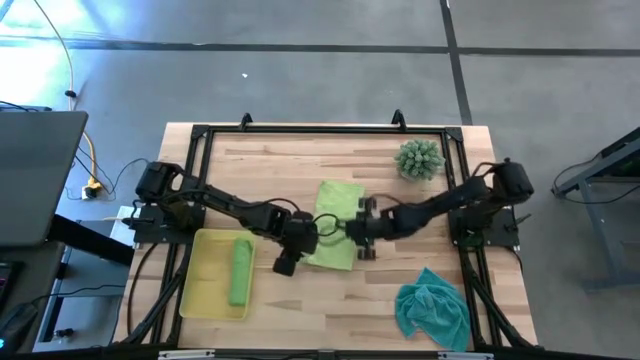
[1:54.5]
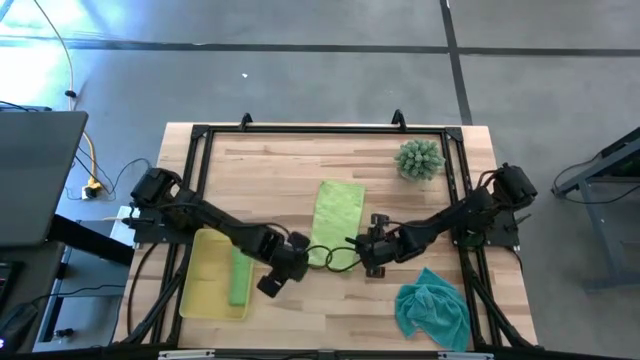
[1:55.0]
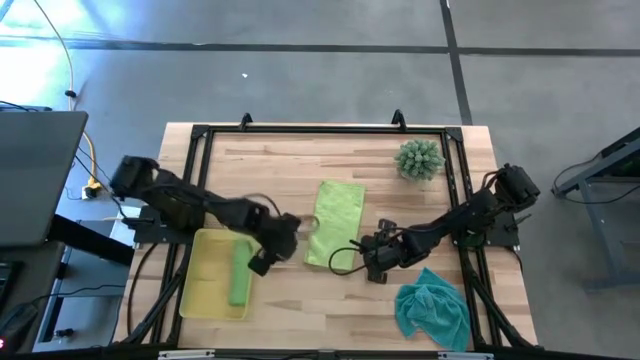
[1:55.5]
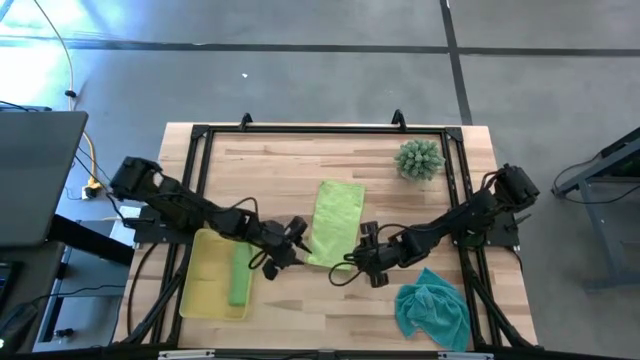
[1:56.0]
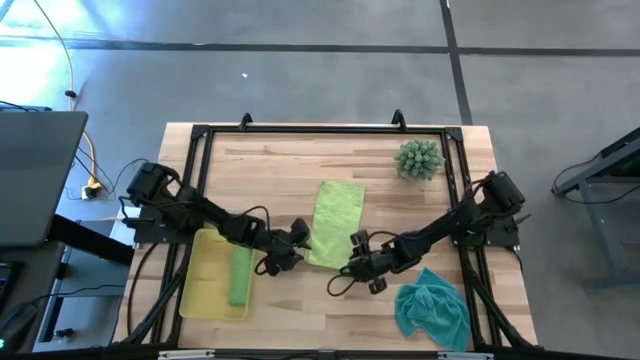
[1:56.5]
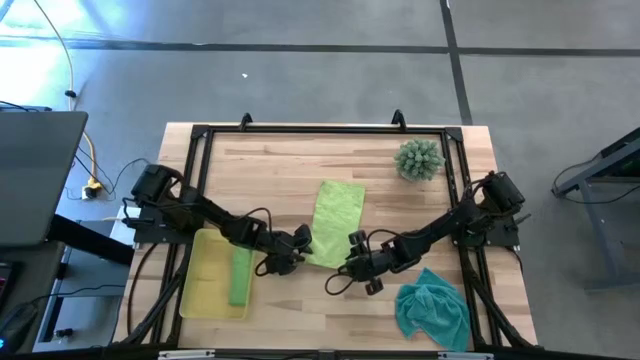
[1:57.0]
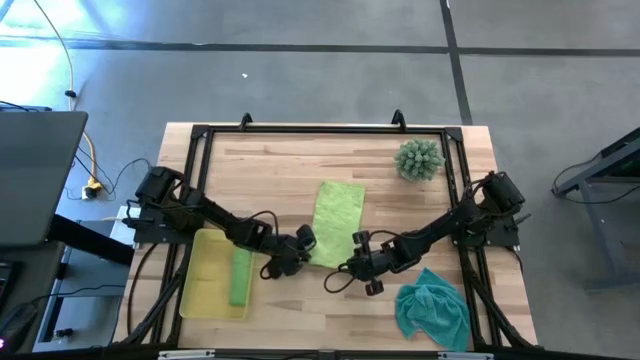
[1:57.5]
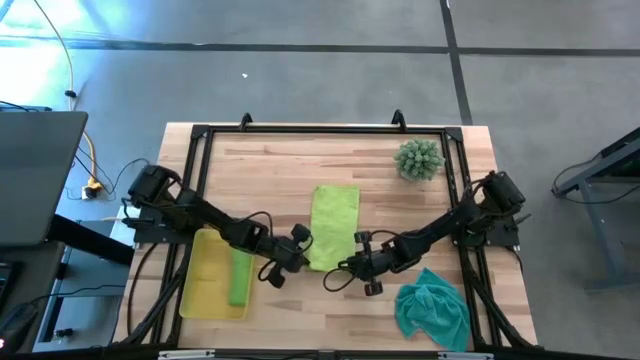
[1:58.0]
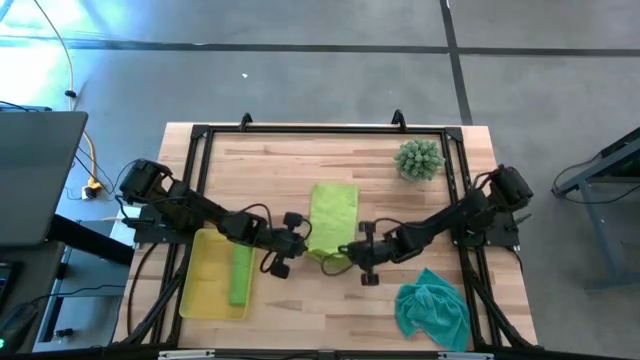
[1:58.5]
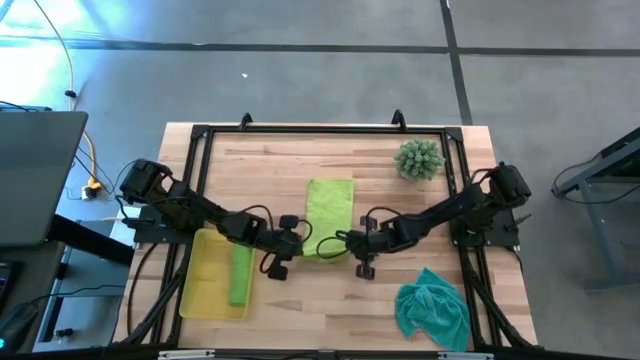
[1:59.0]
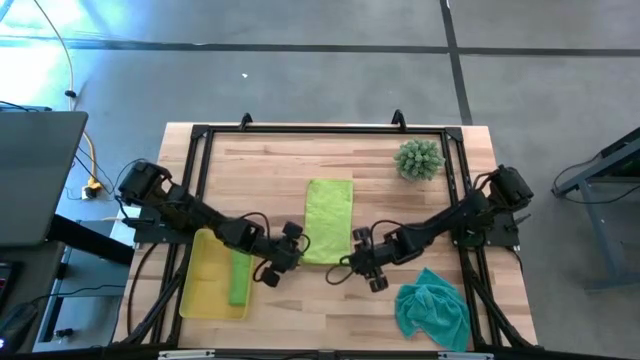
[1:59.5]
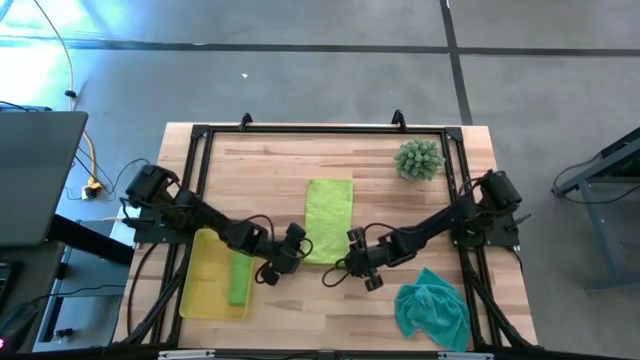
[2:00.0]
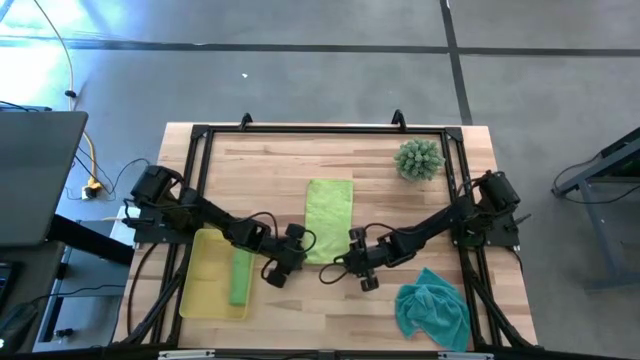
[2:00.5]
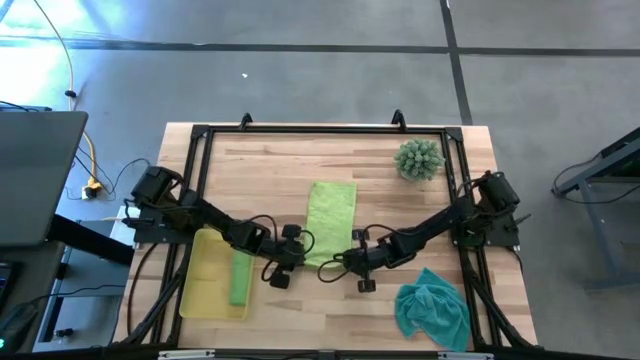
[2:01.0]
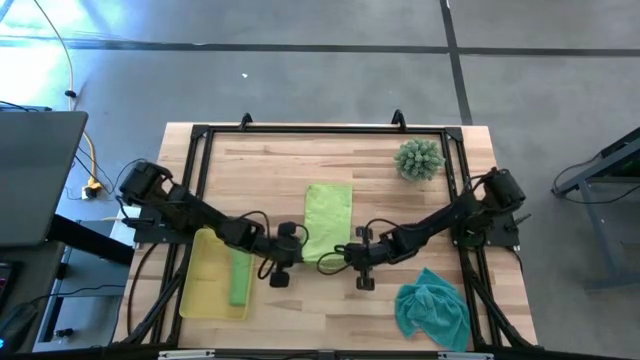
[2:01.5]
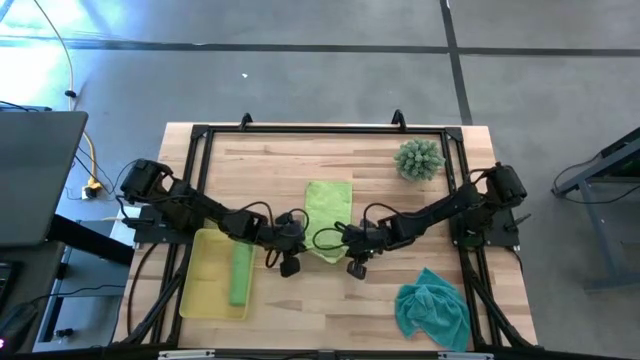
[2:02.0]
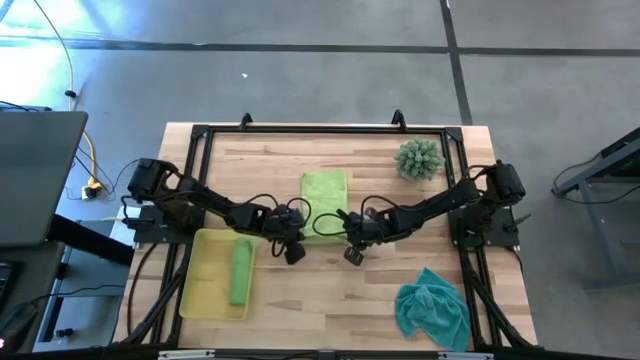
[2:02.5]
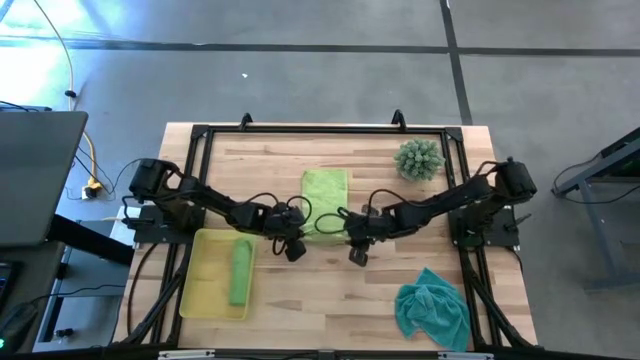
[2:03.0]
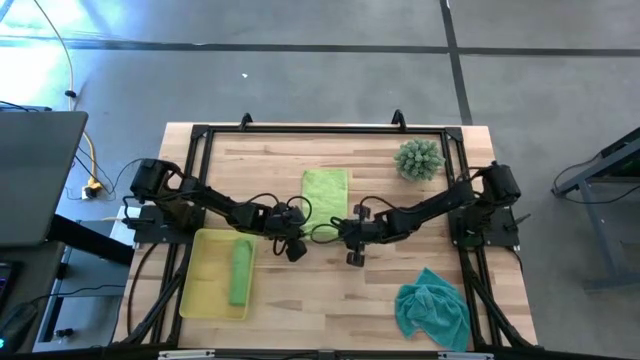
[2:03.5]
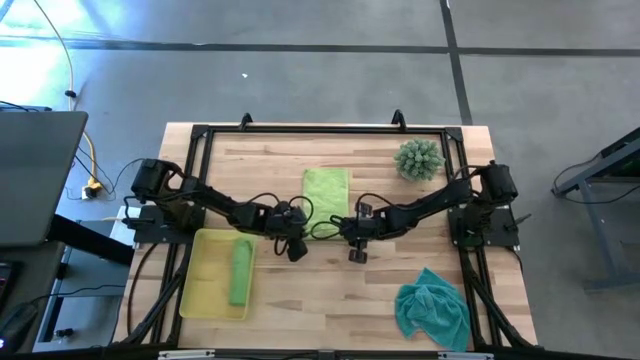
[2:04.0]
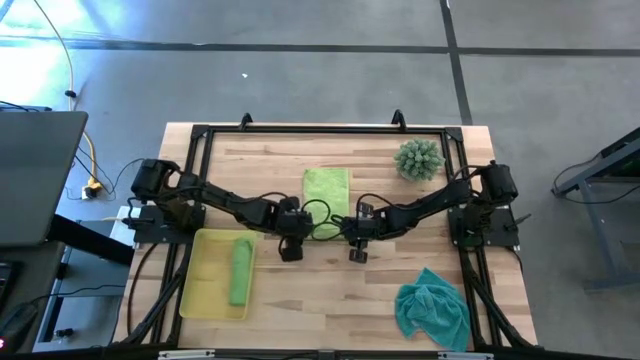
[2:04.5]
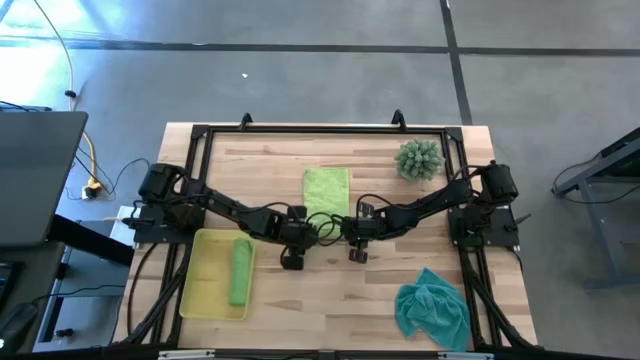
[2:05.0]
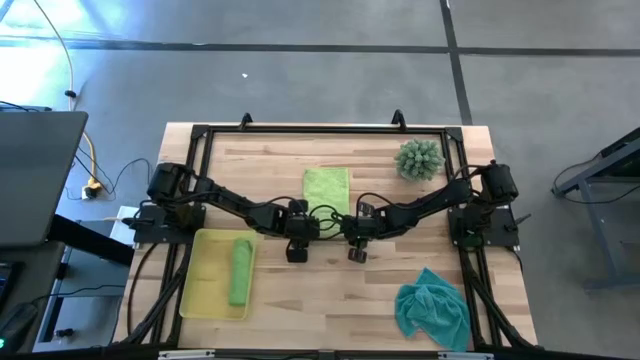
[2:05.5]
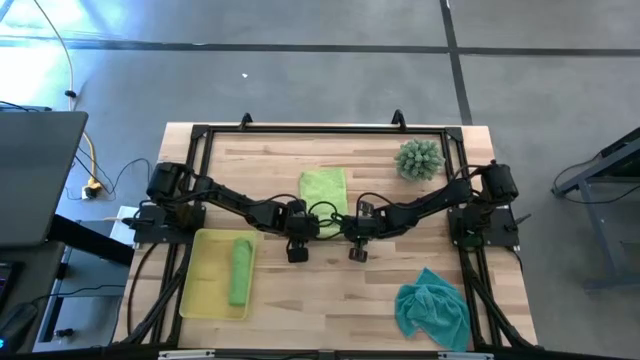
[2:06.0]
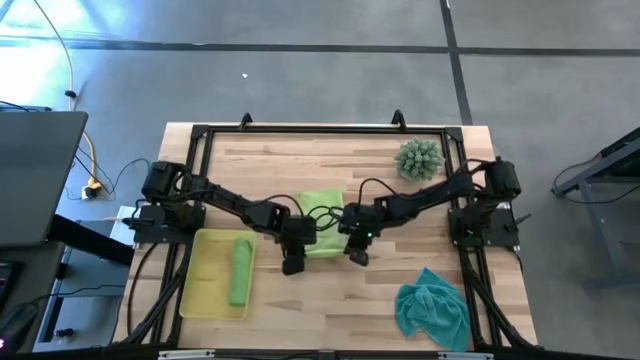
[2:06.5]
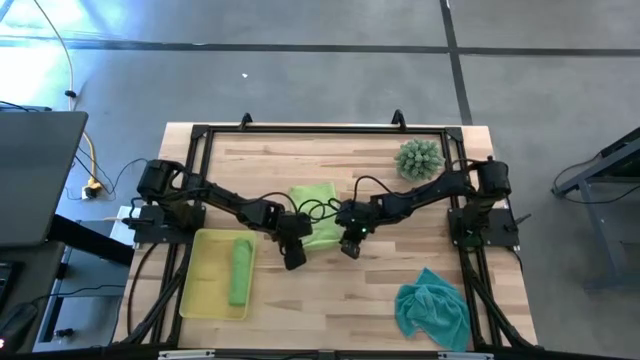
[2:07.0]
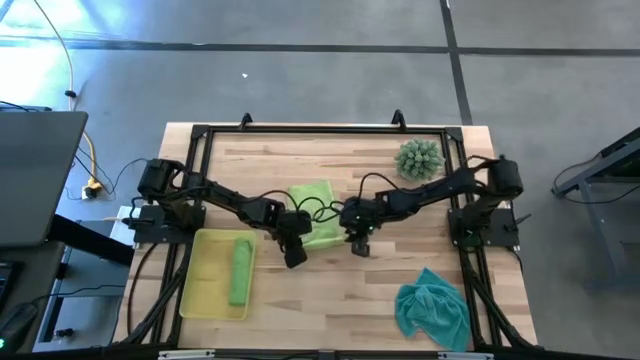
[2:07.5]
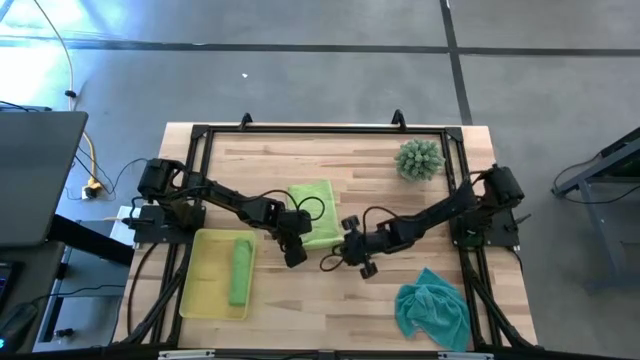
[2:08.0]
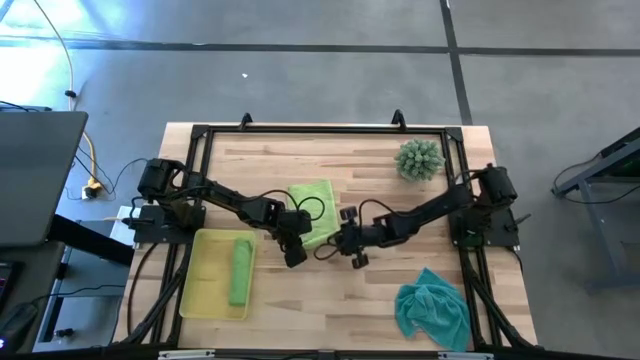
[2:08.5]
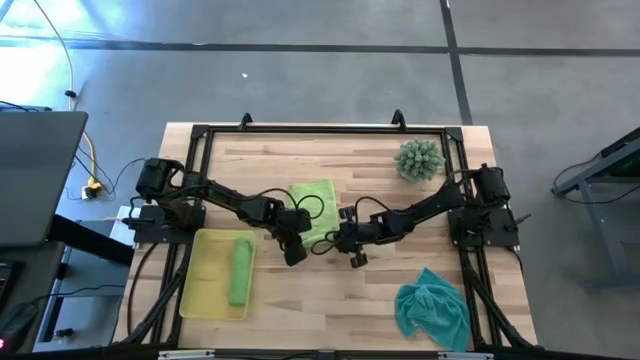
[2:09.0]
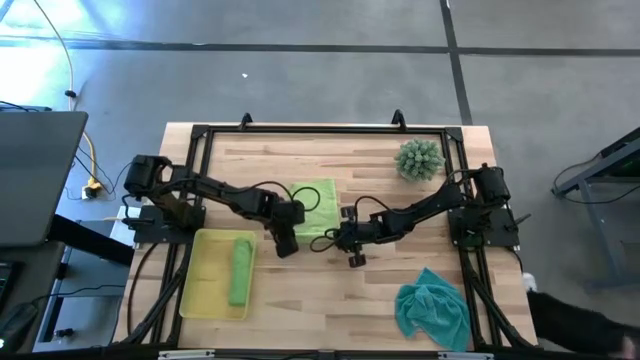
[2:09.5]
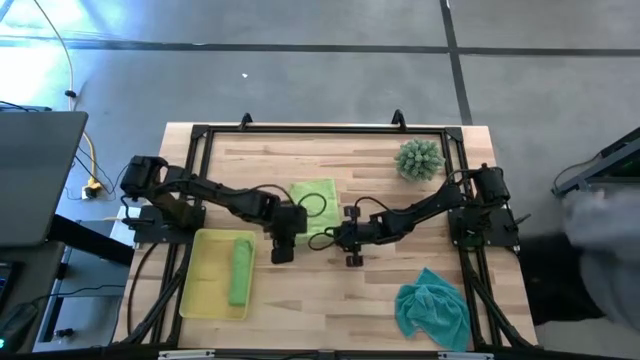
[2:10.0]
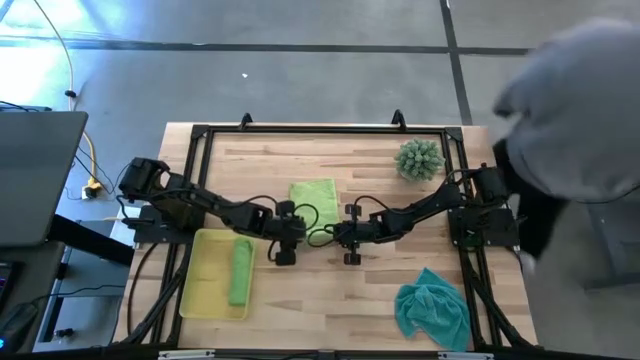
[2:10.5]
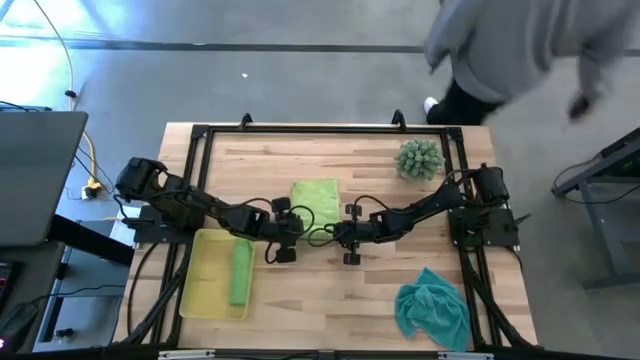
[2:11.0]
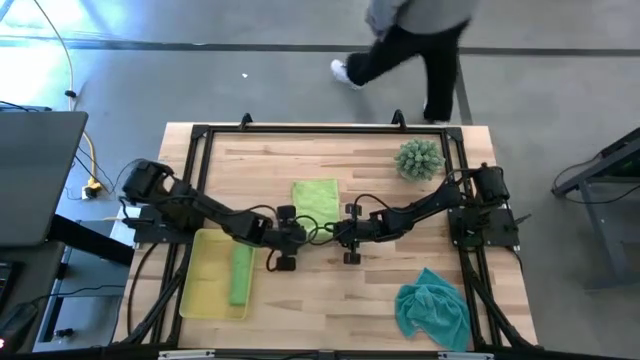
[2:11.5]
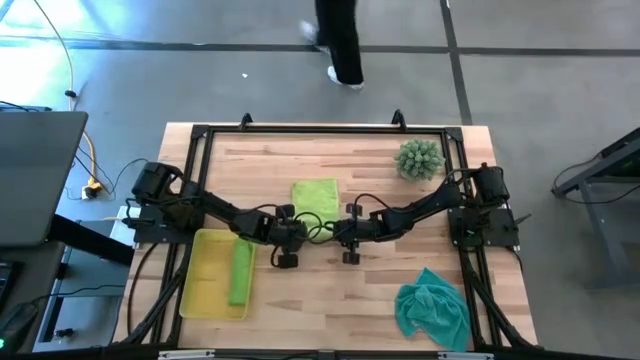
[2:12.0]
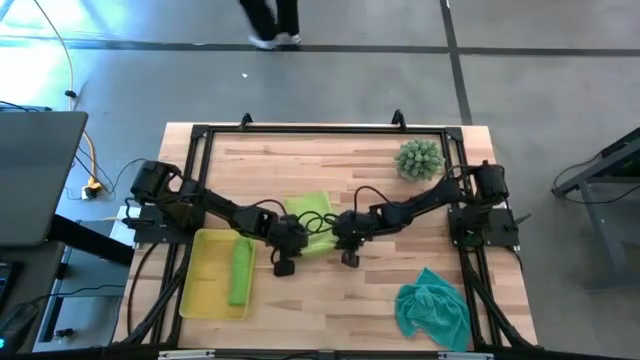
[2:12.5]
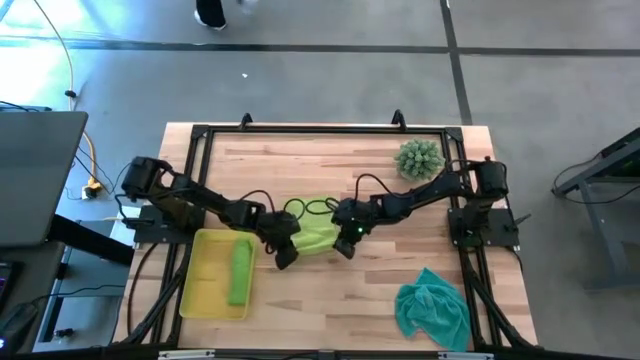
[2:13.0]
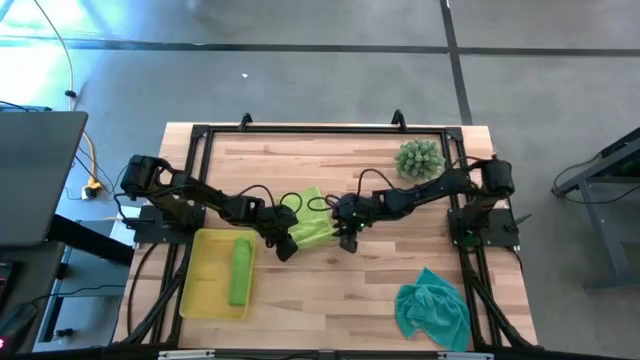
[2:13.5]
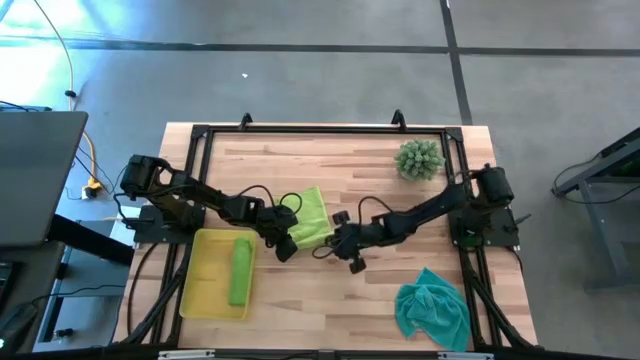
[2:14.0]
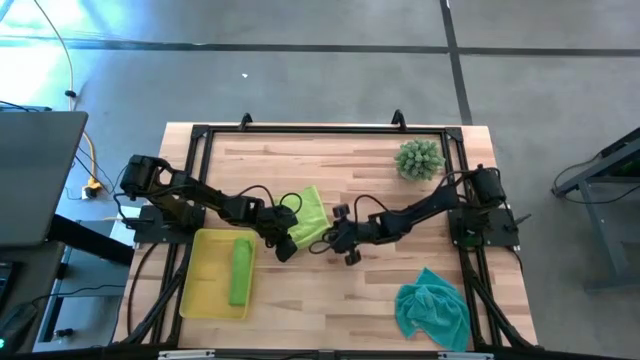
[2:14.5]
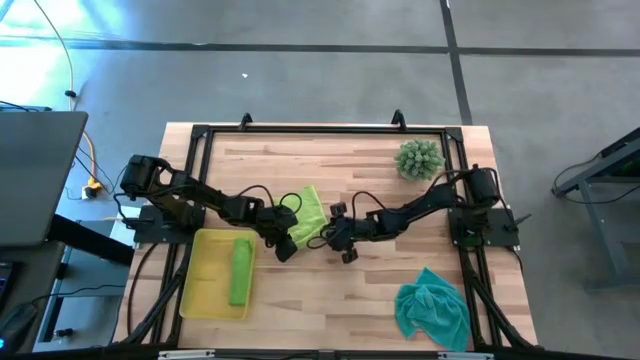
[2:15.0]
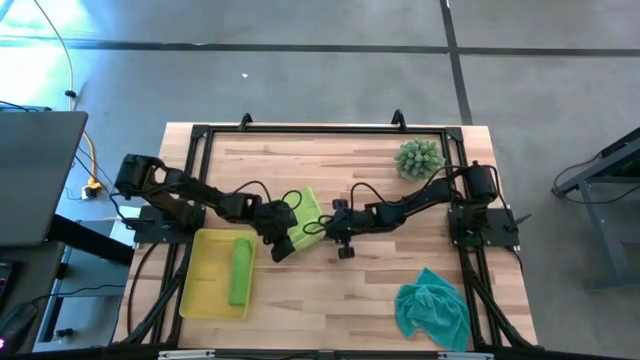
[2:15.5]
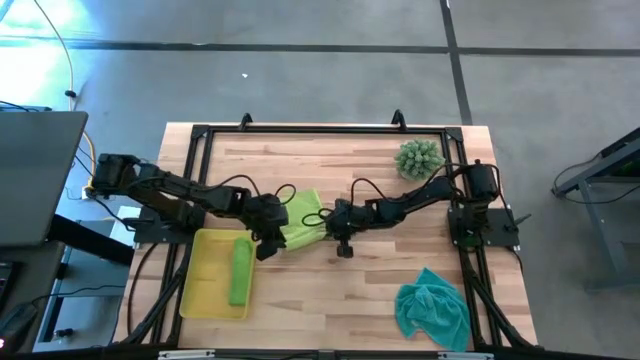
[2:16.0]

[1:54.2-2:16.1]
Task: Roll microfiber towels into tight, uniform cylinder then place into a basket
Roll the light green microfiber towel
